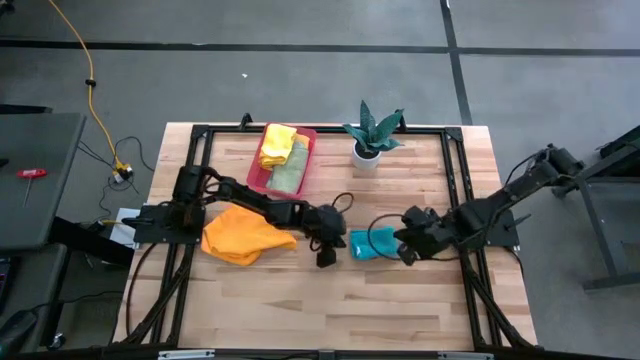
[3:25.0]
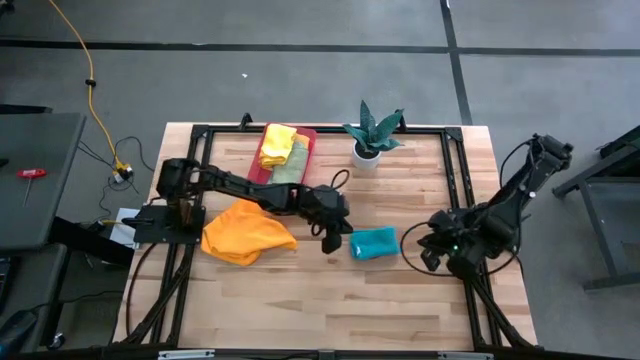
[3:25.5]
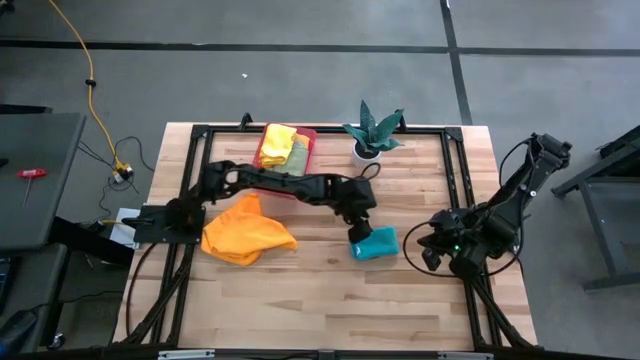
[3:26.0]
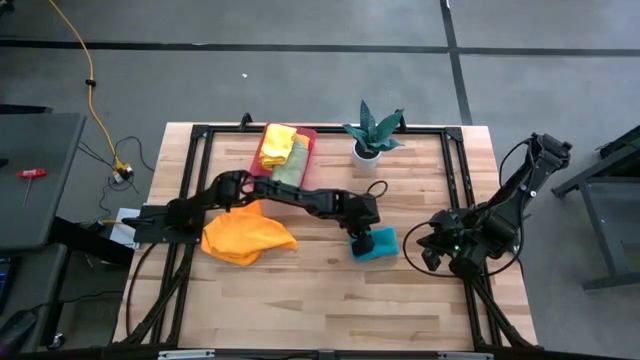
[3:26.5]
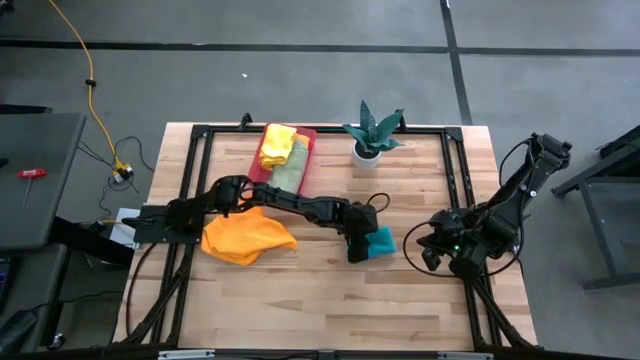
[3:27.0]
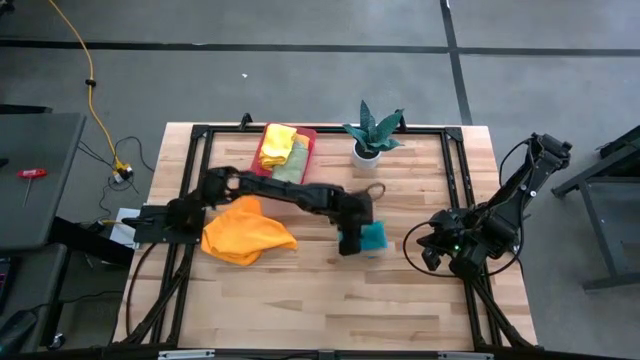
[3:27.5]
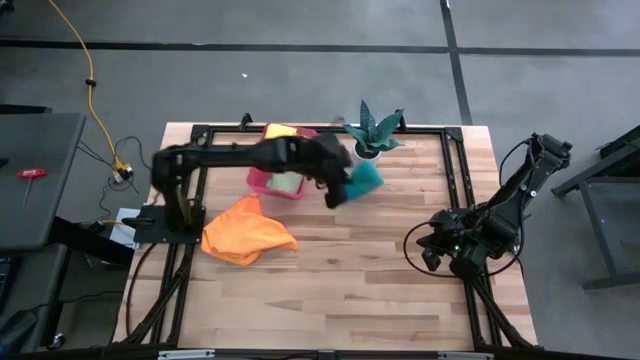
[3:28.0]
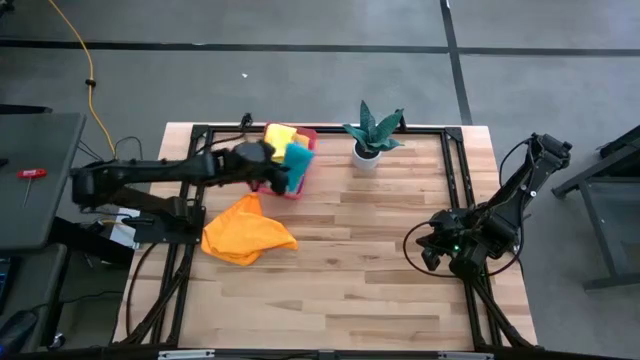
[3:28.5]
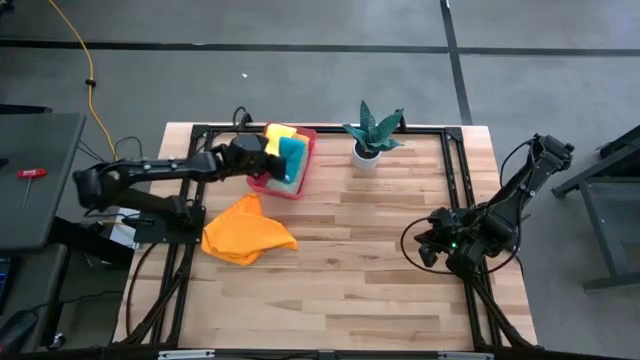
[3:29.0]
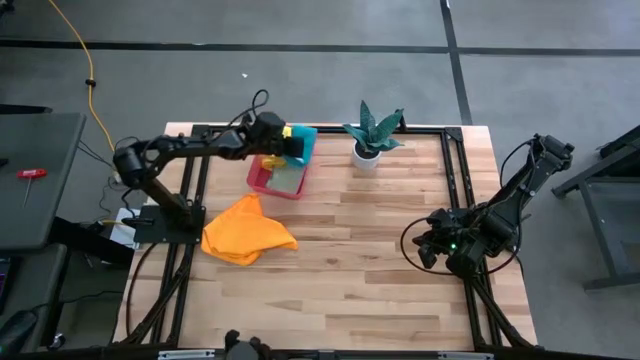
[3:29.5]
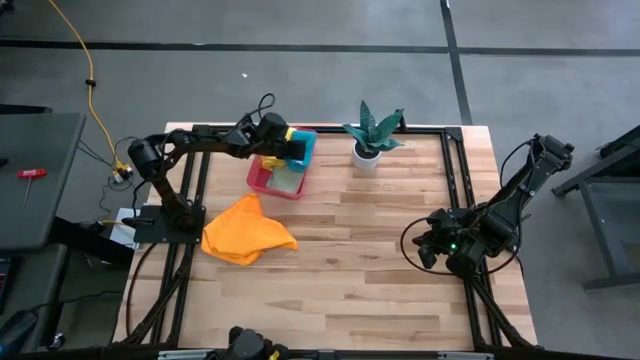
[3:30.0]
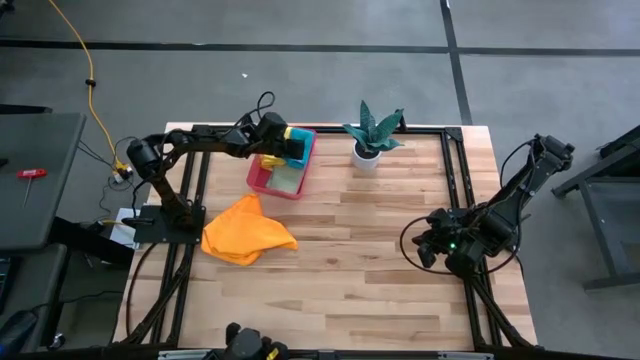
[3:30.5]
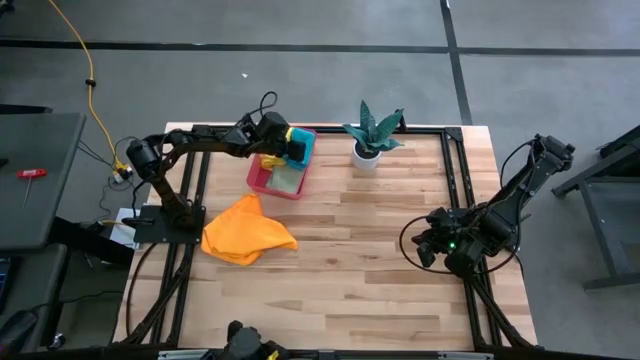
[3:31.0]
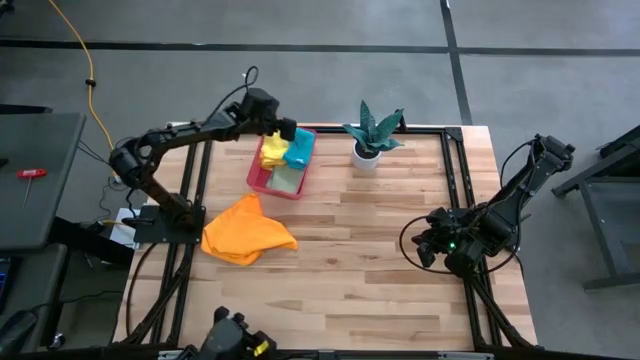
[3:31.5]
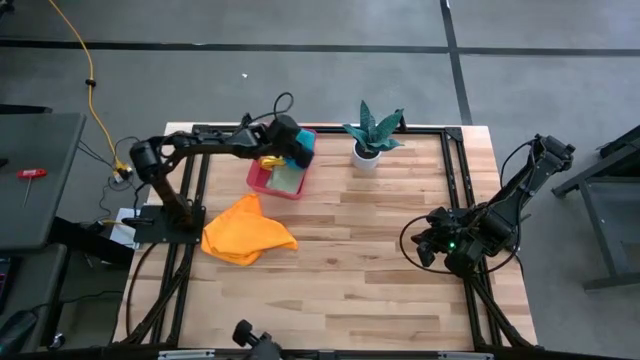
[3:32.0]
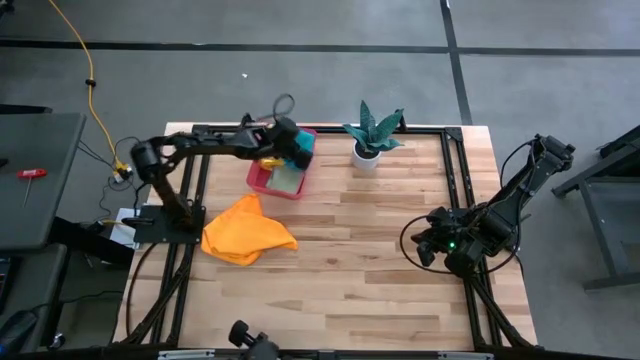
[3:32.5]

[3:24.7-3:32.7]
Task: Fold microfiber towels
Put the folded blue microfiber cloth into the red bin

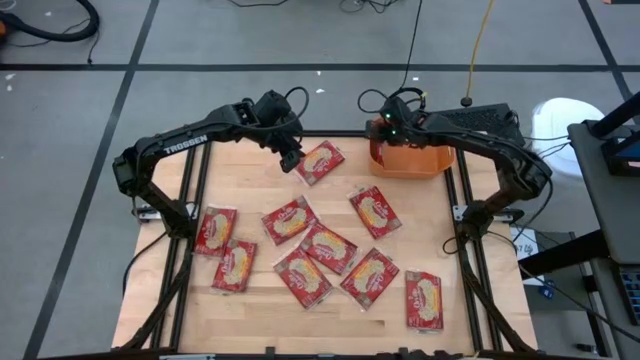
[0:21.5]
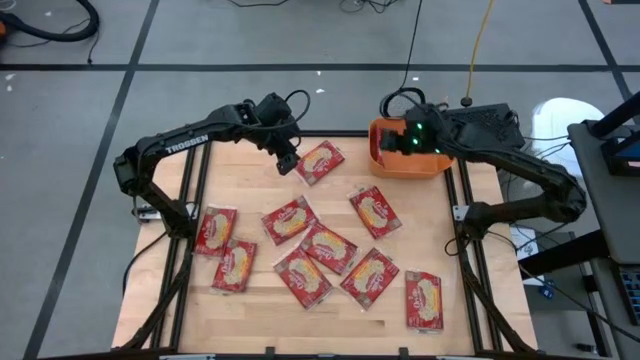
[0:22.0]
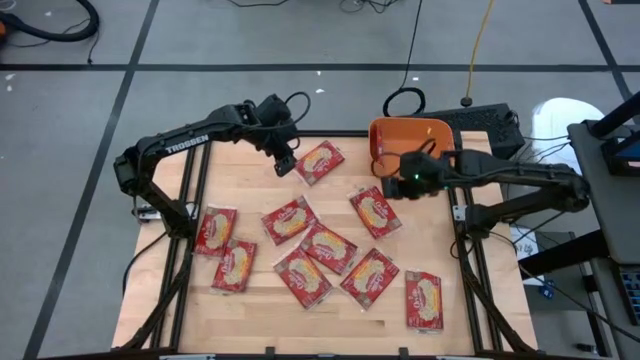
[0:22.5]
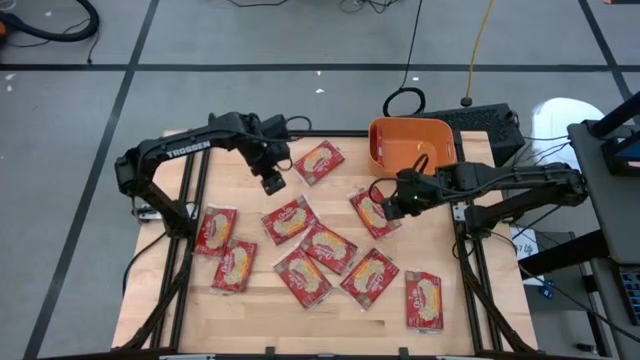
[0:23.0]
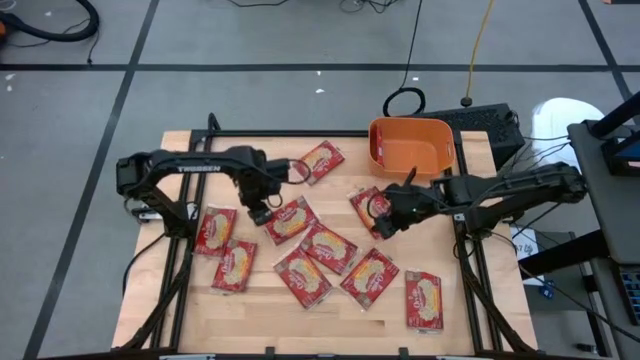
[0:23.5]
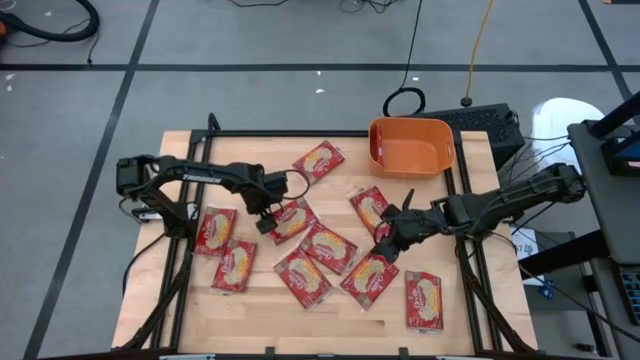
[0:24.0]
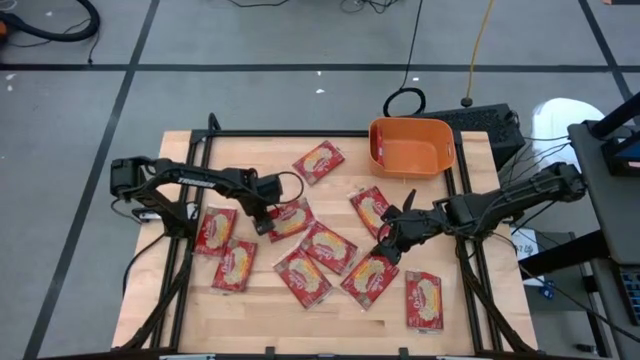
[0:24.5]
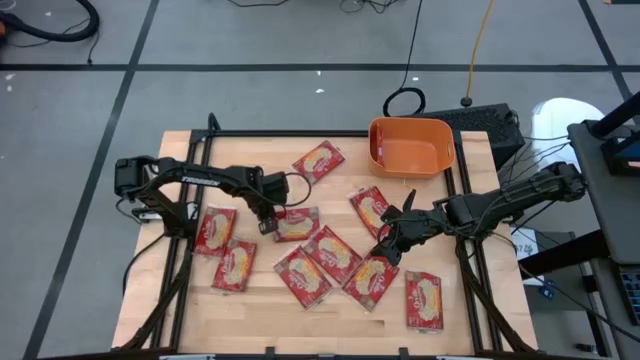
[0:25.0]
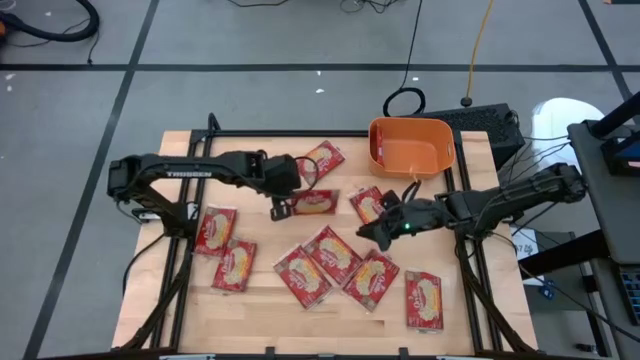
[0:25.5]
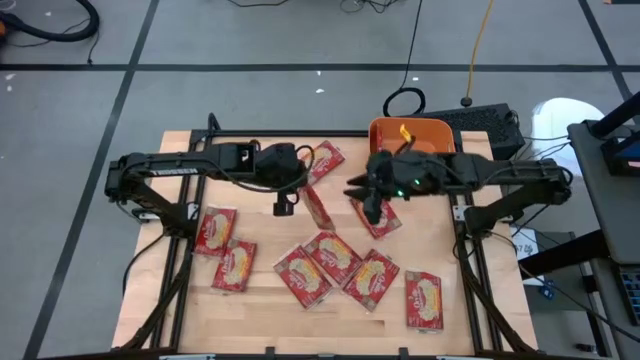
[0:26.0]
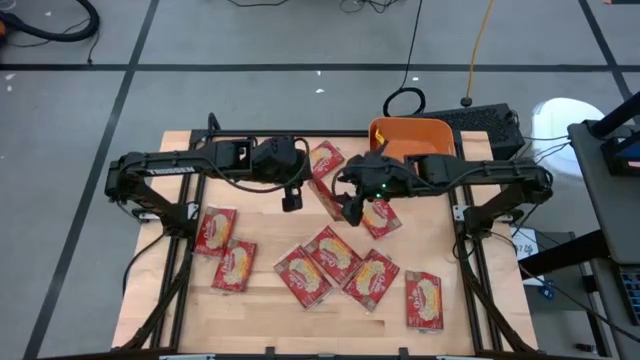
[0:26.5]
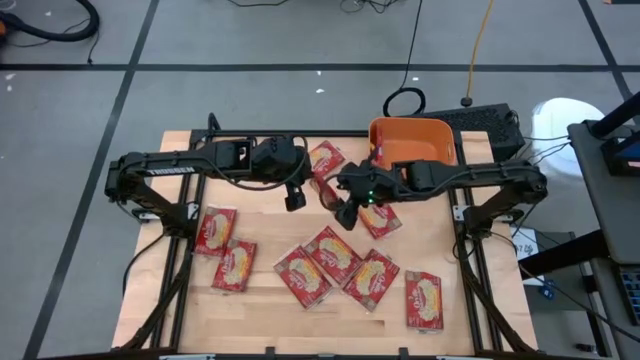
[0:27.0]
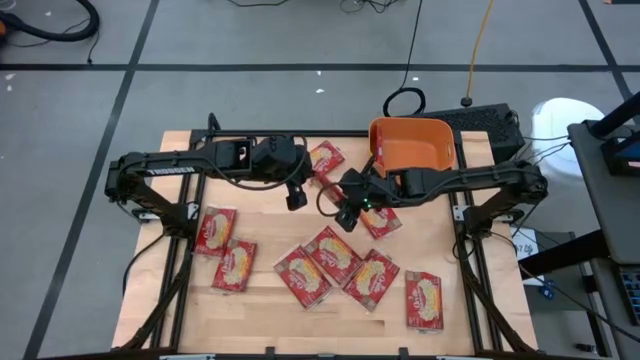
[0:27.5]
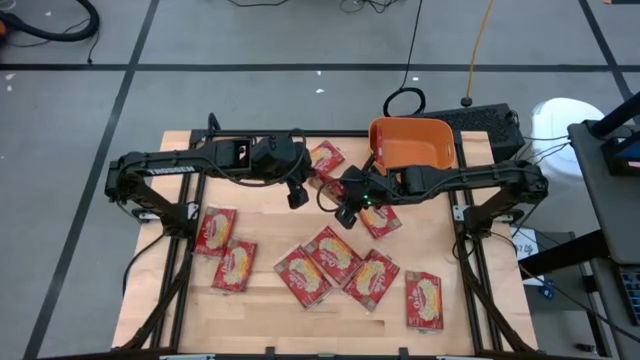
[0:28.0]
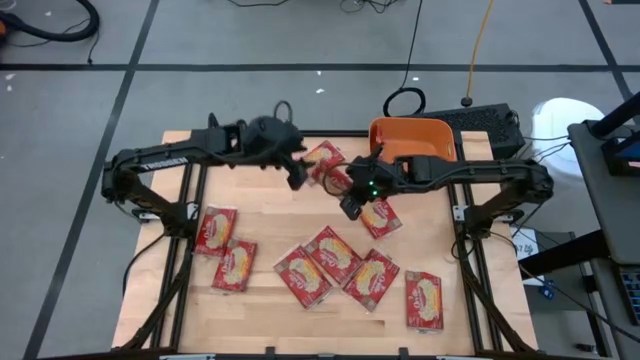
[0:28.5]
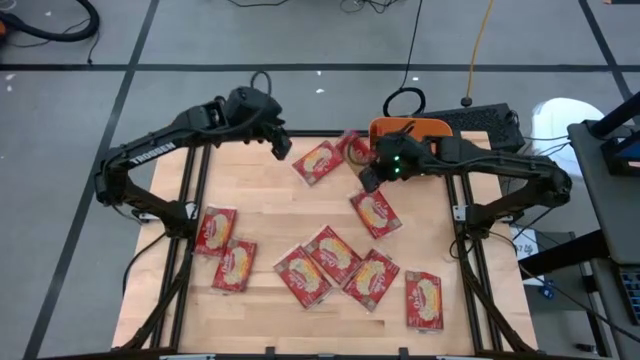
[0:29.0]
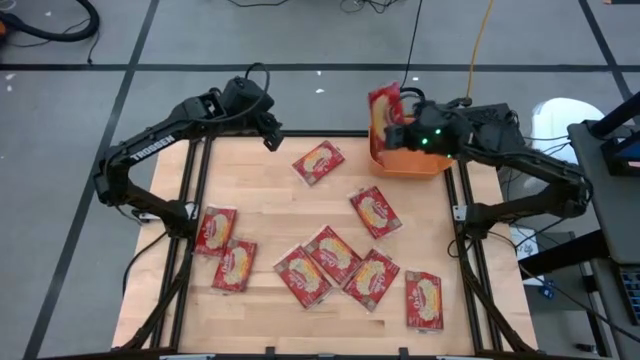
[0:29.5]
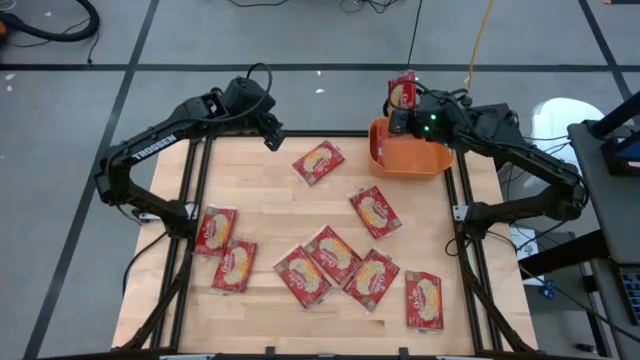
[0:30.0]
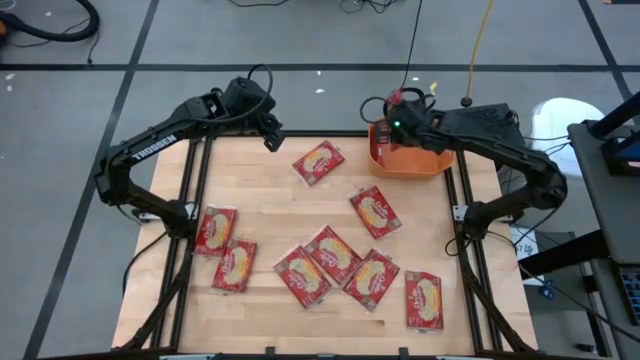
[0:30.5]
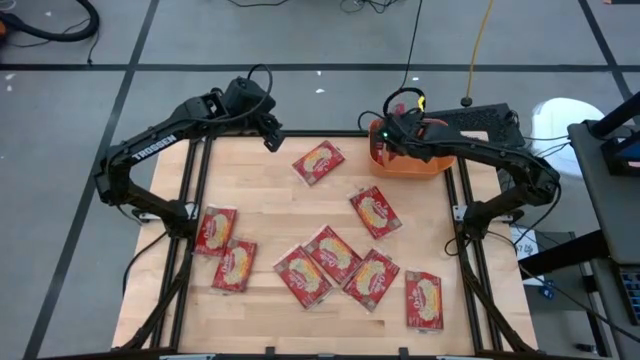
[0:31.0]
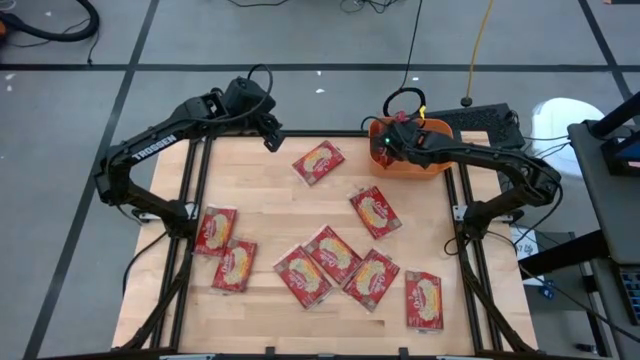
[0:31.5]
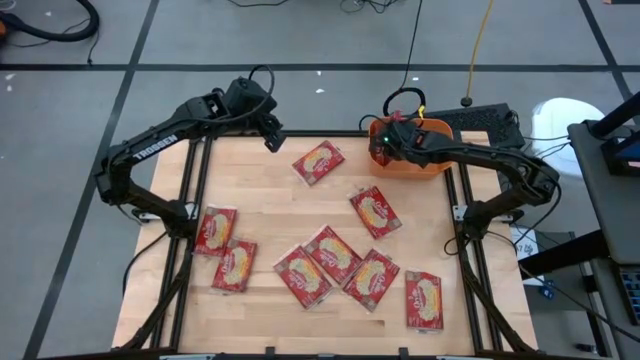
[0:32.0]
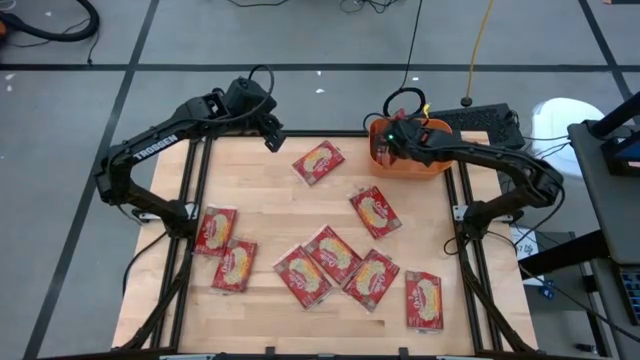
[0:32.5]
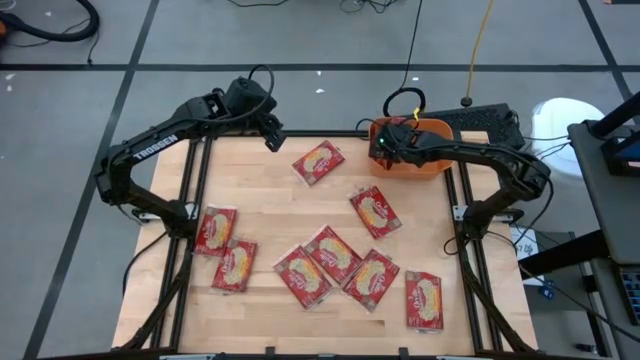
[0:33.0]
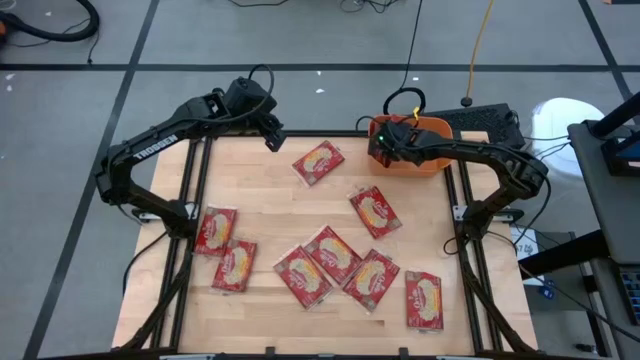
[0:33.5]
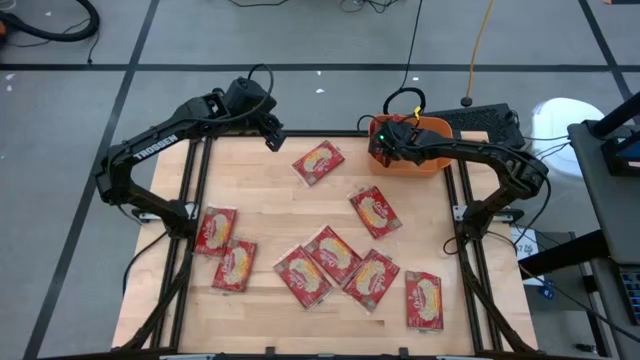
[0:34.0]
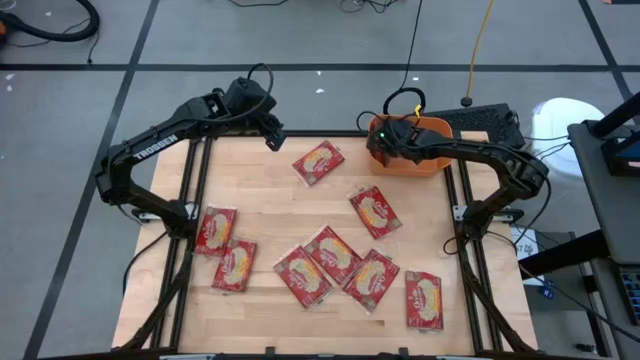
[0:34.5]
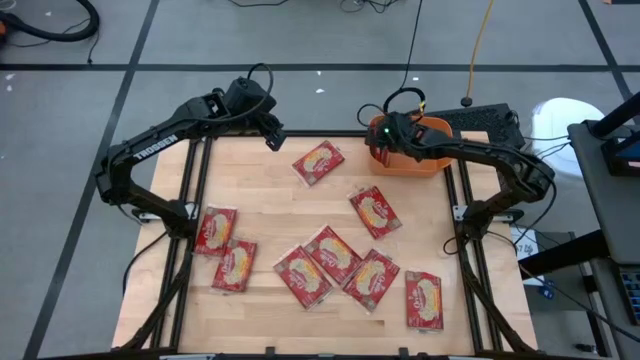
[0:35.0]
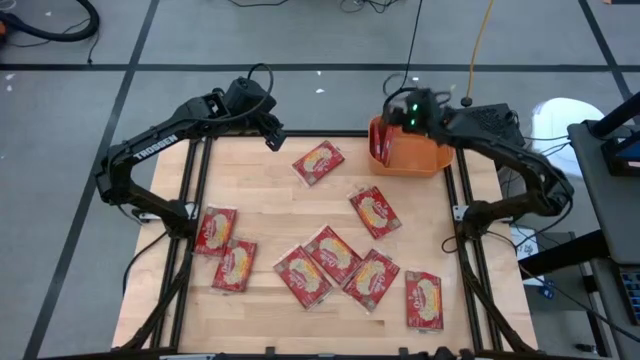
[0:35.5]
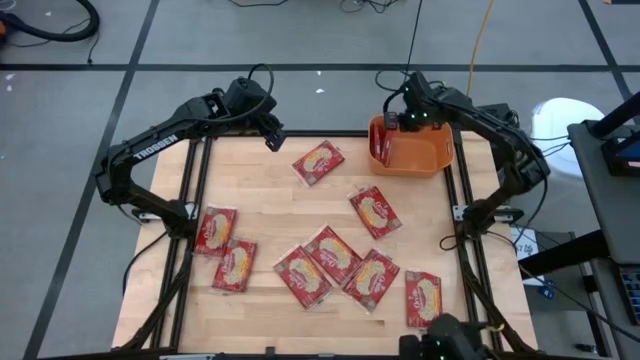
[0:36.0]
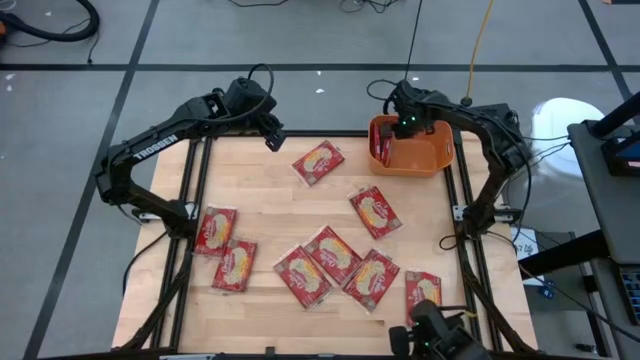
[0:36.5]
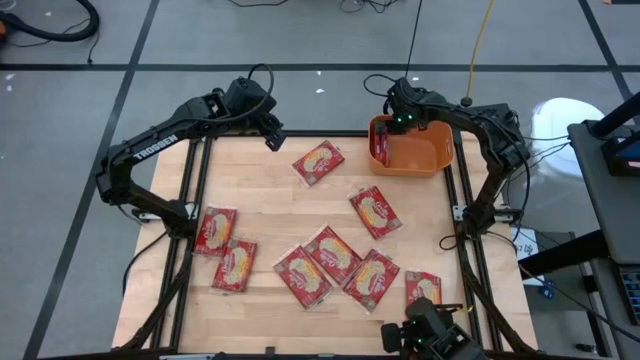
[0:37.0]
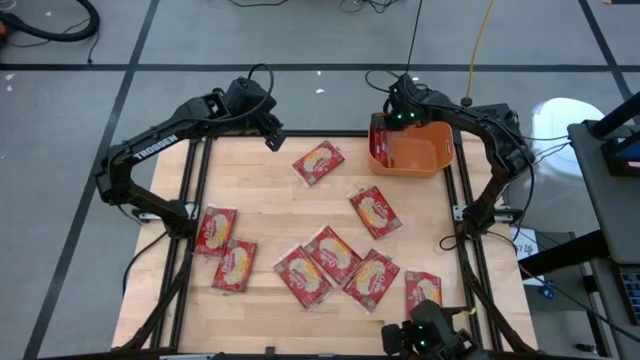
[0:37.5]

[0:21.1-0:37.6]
Task: Sort popcorn bags into baskets
Put the red popcorn bag into the orange bin
